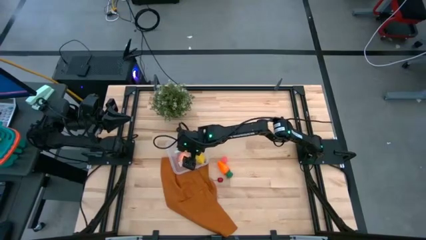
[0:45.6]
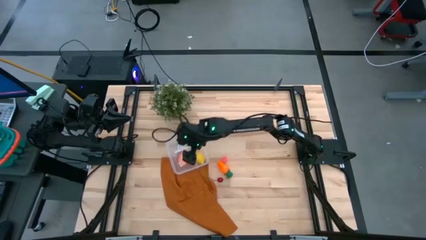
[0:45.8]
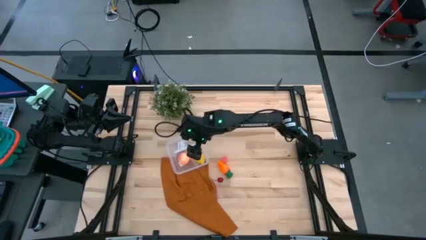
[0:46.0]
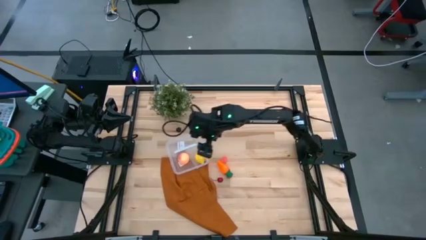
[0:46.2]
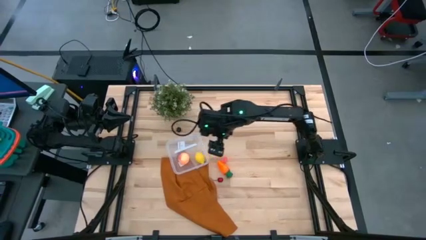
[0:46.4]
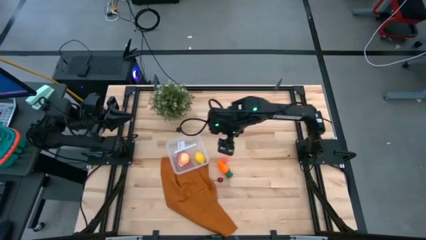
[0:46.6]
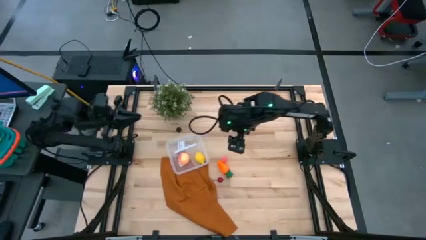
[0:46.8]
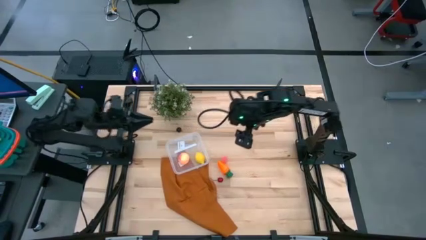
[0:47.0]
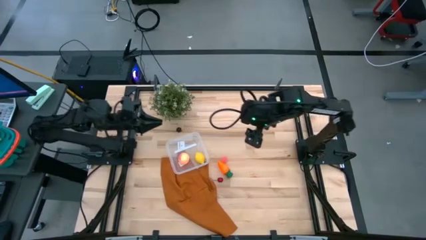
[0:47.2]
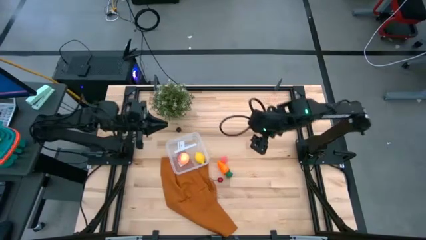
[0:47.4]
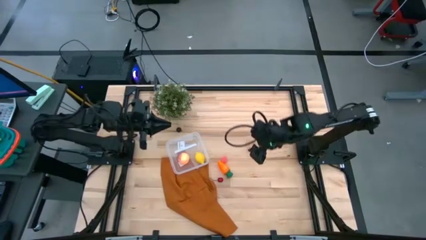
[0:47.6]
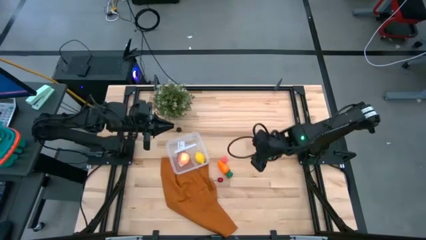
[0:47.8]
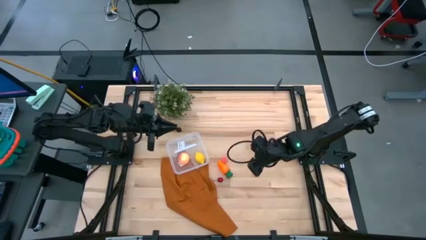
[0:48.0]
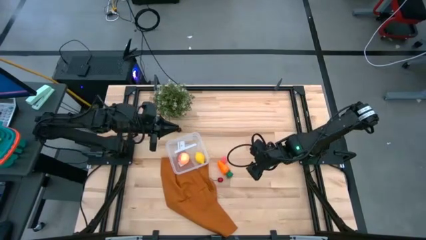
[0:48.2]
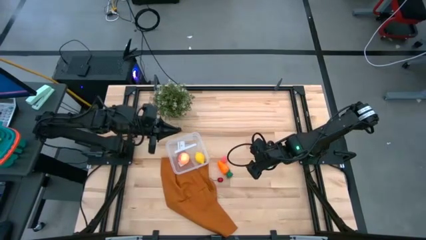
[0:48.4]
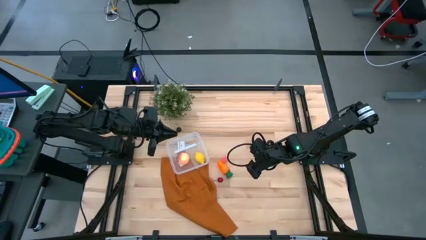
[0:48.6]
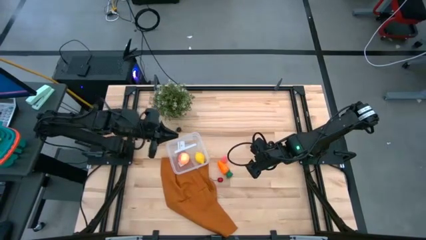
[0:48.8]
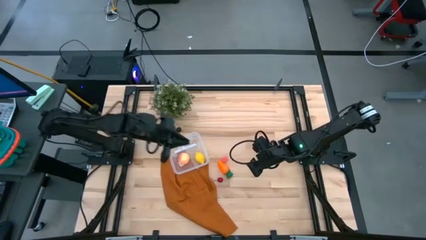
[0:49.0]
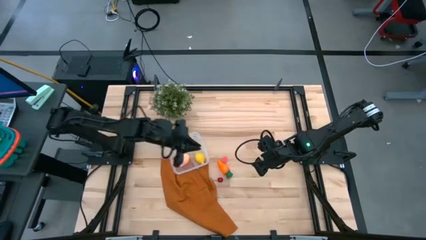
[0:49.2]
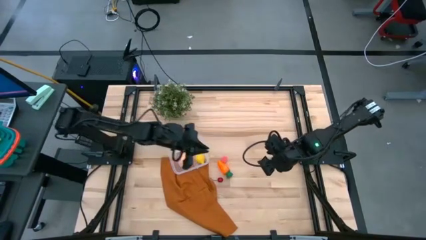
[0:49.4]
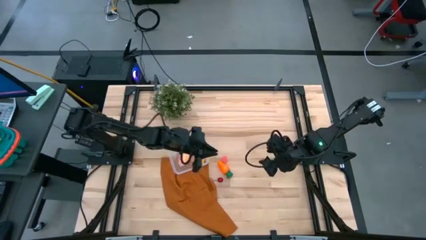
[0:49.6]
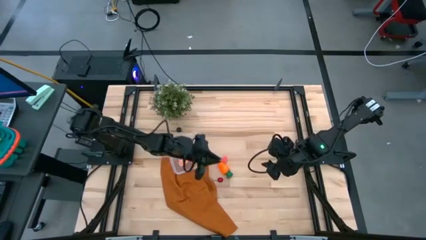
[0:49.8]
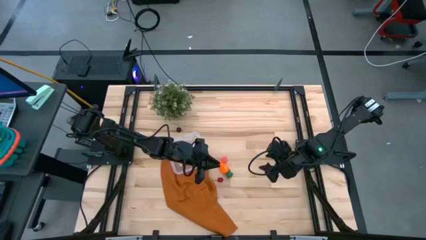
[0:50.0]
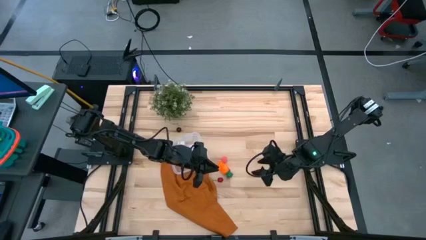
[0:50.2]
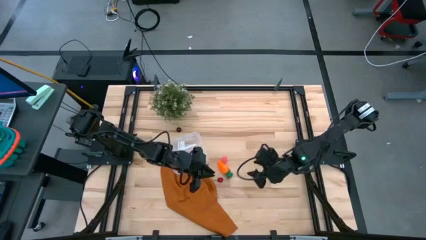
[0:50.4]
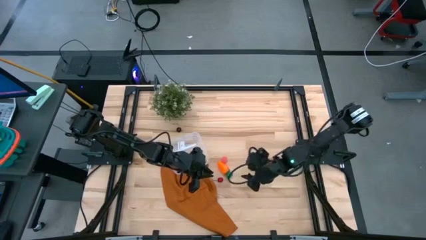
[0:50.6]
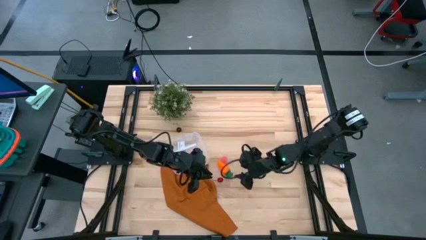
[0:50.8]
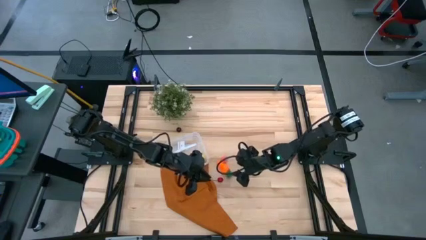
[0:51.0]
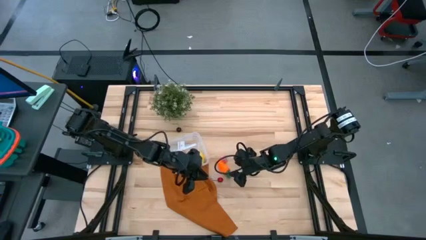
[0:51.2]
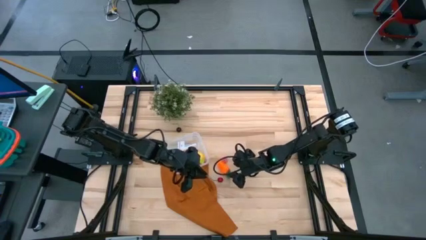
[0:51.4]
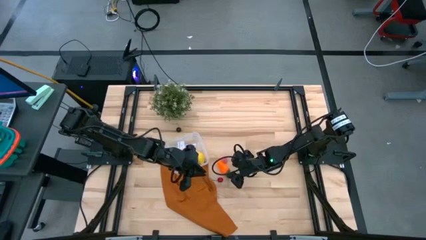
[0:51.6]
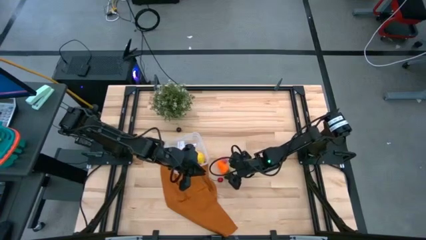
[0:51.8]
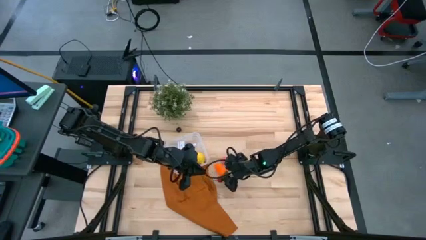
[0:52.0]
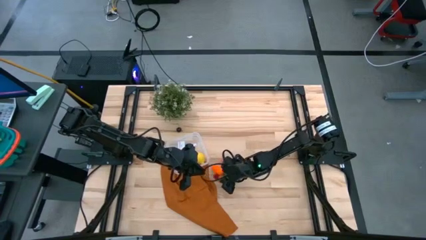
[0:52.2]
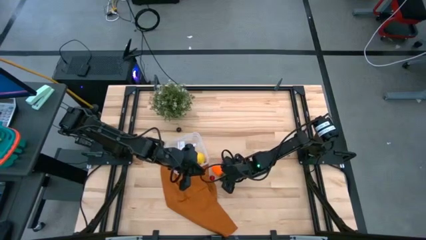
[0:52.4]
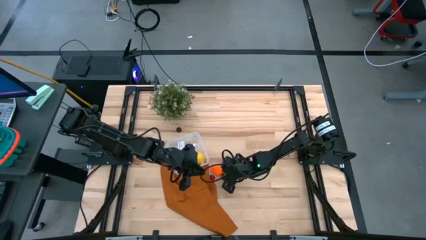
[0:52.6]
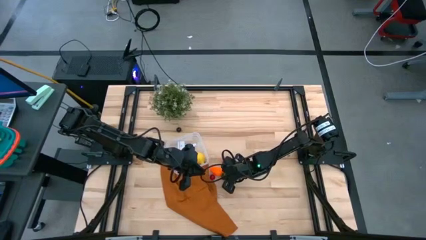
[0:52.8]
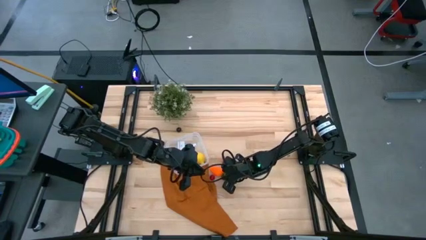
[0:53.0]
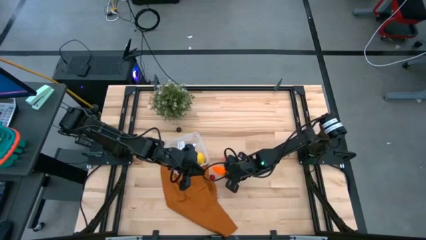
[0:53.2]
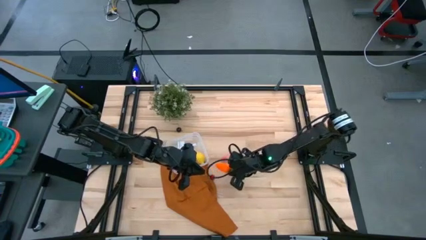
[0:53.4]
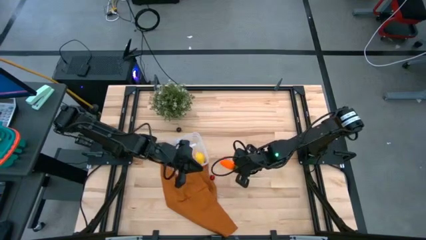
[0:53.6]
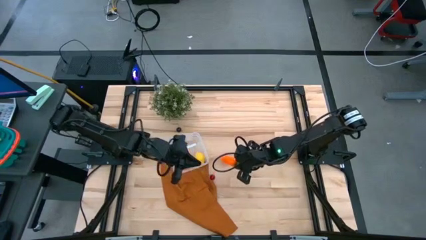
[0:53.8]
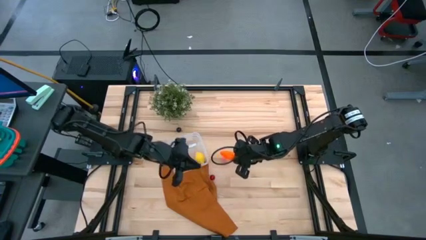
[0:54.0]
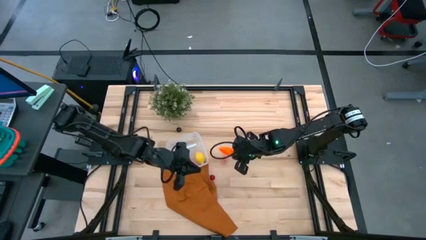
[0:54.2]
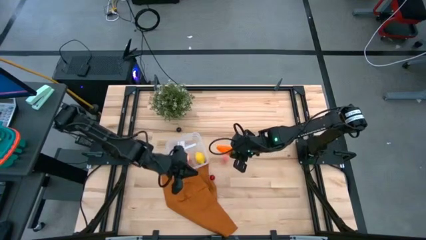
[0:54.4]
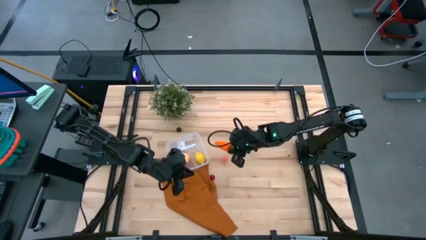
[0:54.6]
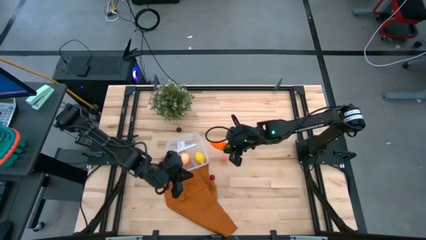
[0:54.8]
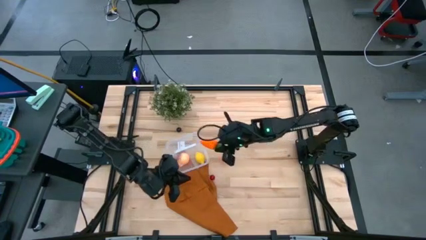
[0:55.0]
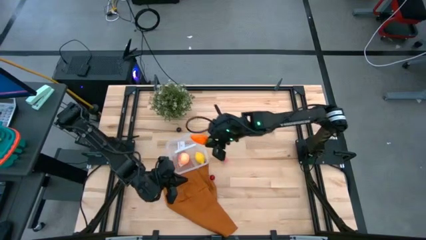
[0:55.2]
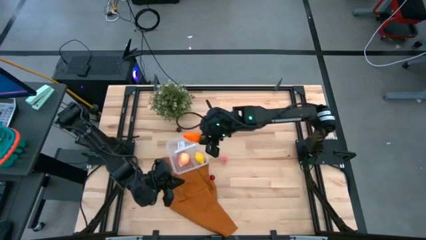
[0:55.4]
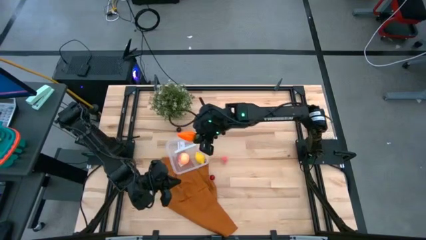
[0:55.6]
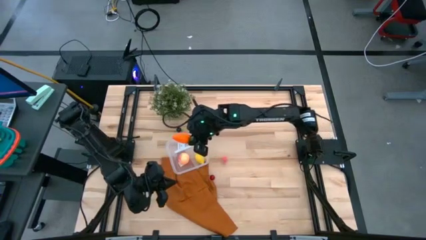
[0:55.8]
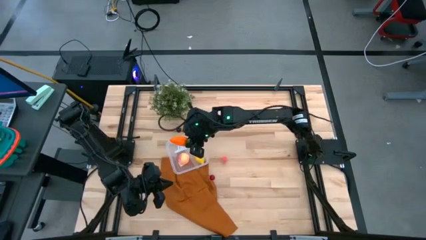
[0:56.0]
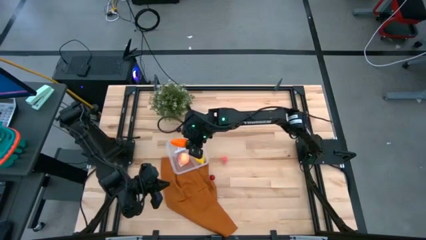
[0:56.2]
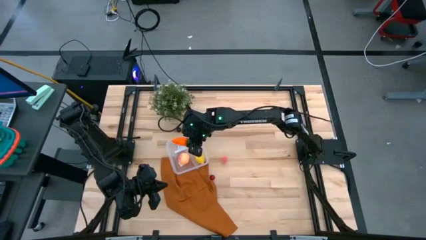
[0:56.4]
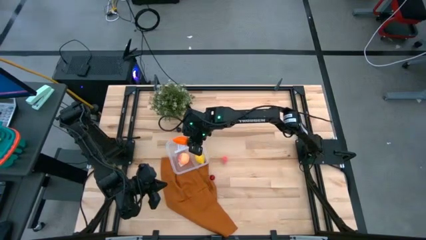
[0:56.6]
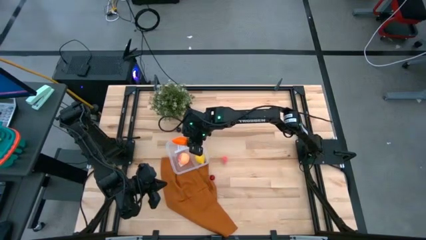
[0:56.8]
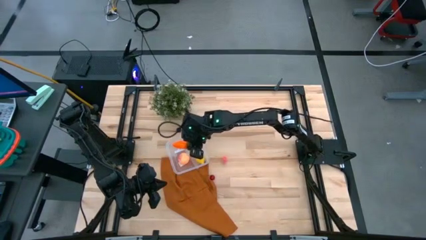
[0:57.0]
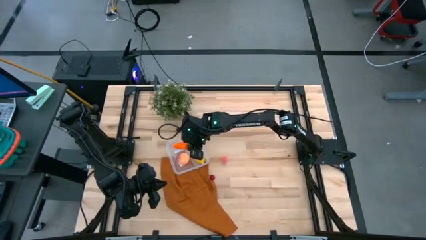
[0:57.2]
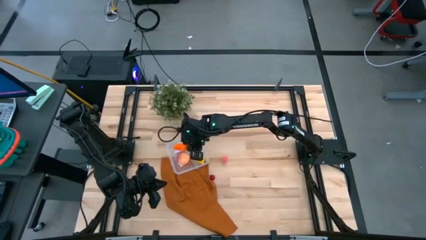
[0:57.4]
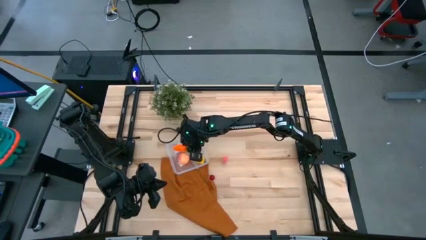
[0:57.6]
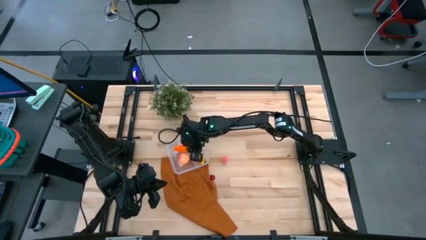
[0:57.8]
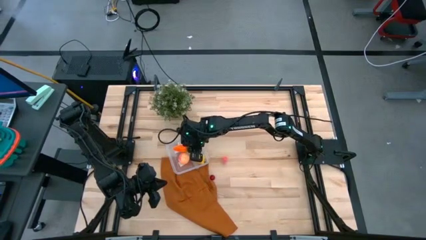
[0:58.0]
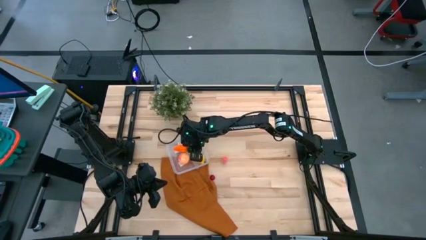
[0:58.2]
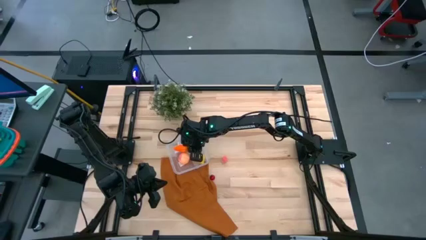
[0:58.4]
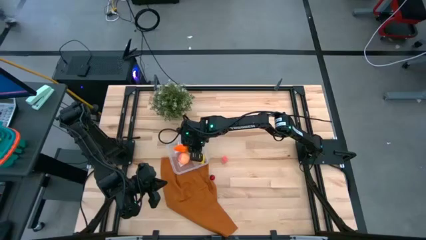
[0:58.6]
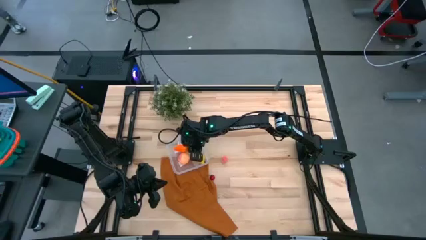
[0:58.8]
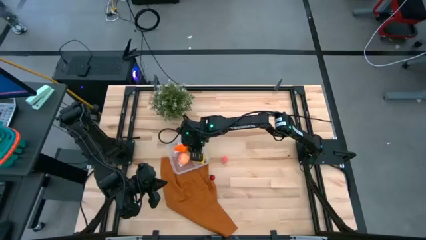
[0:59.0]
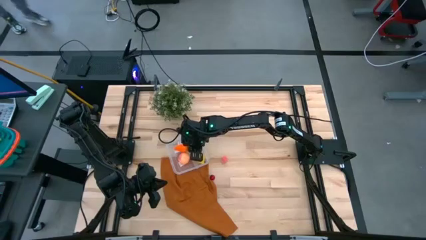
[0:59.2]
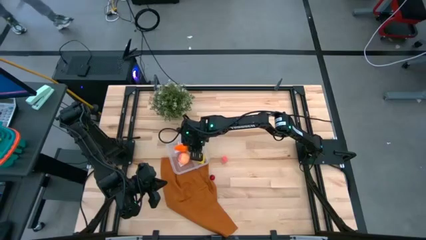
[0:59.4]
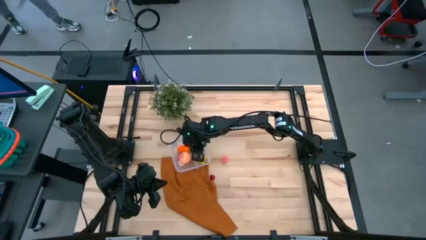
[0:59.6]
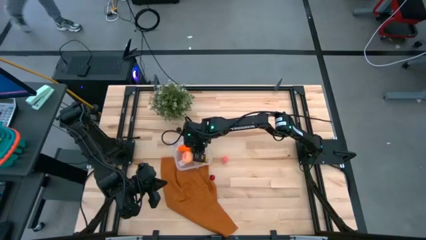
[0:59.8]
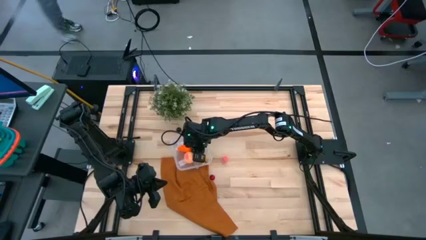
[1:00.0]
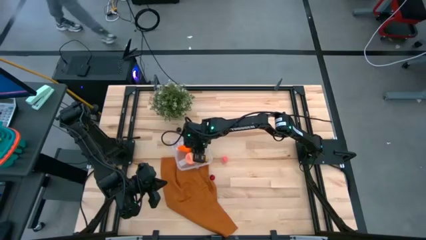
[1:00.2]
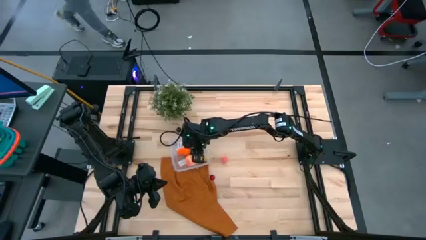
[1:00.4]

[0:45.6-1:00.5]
Task: Pick and placing Produce into tupperware
Put the orange carrot into the bin
